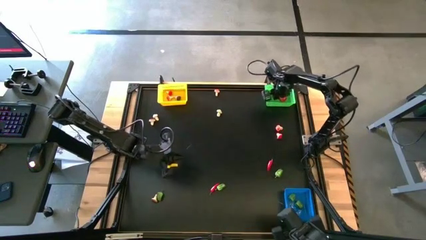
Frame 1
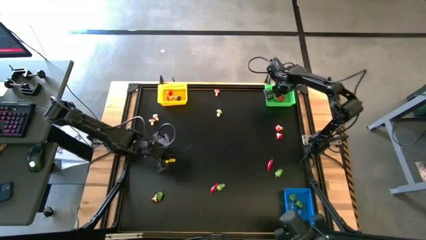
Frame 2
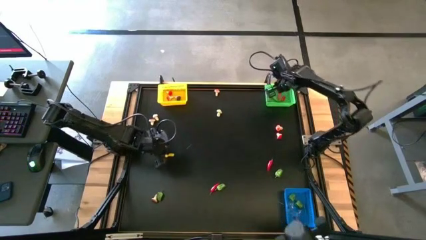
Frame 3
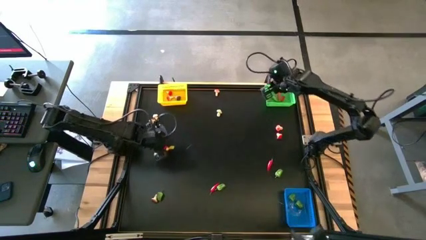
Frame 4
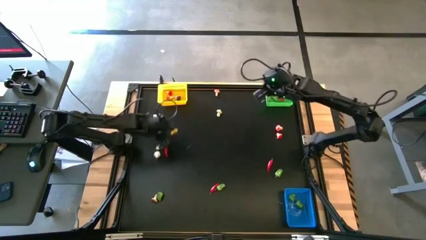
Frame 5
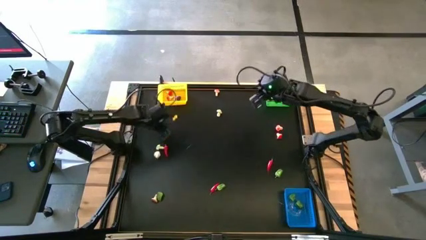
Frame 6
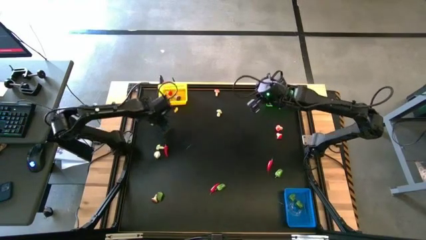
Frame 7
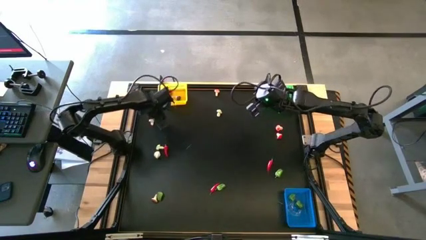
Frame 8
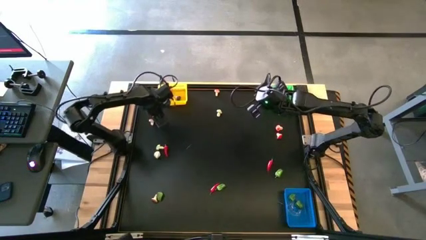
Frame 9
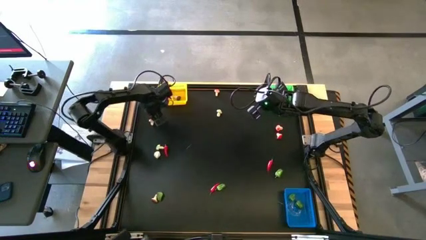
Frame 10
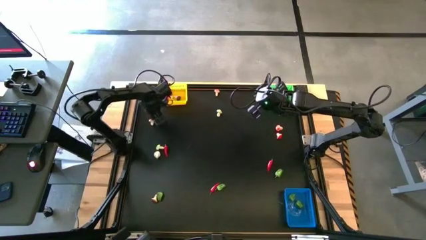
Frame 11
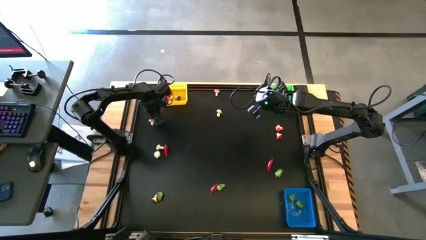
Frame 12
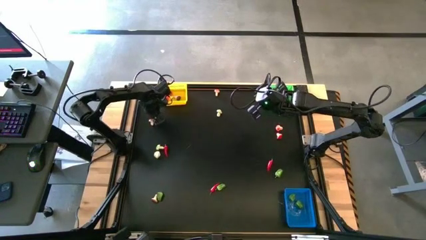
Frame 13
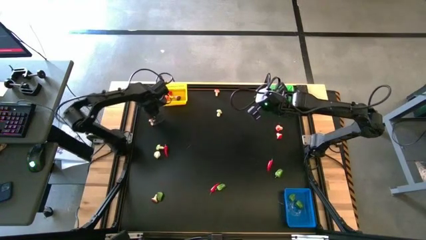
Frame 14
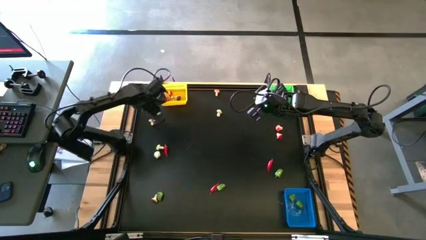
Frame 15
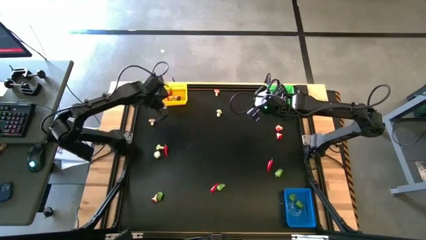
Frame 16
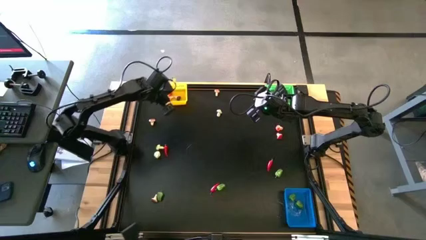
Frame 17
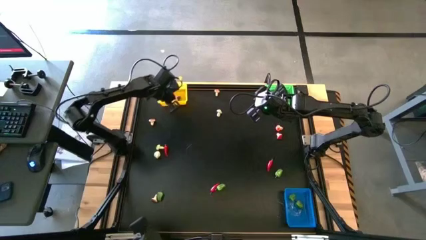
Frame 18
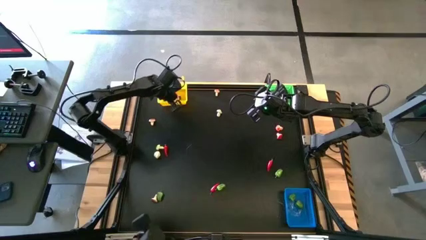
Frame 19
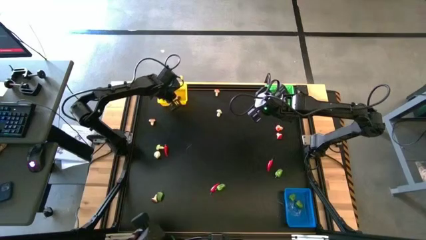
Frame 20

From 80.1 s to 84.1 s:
Task: Sort produce into baskets
Put the brown mushroom into the yellow bin

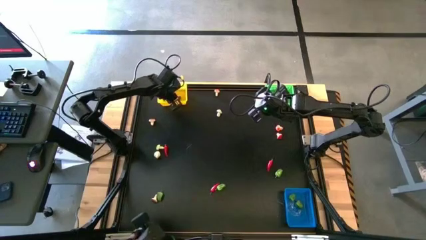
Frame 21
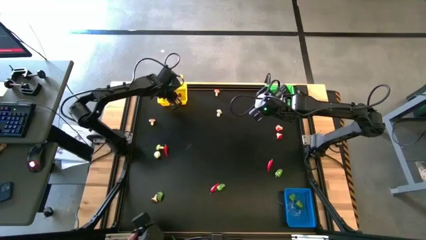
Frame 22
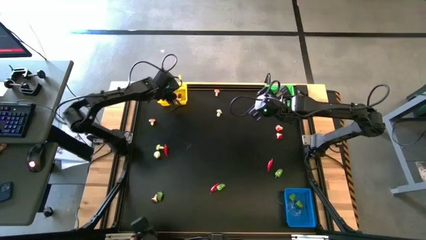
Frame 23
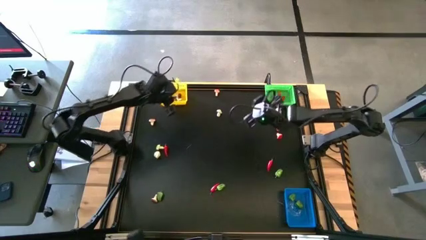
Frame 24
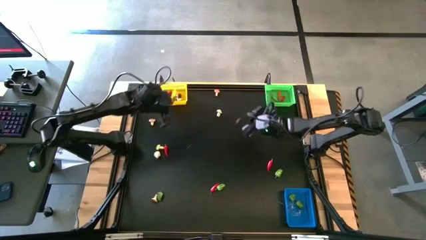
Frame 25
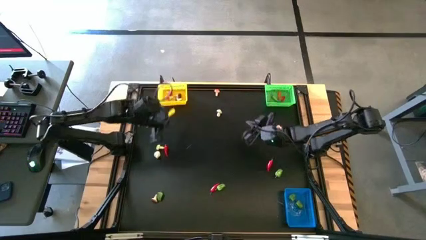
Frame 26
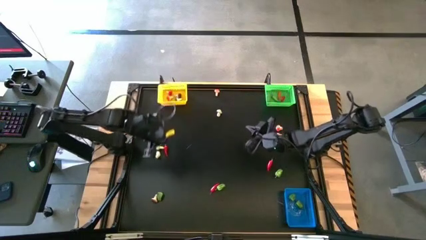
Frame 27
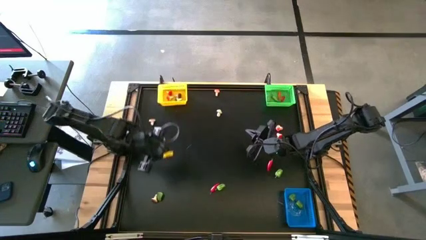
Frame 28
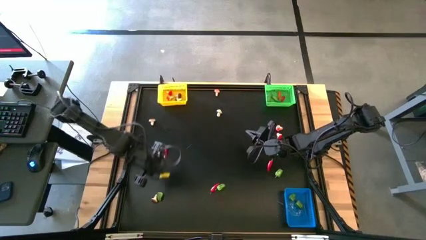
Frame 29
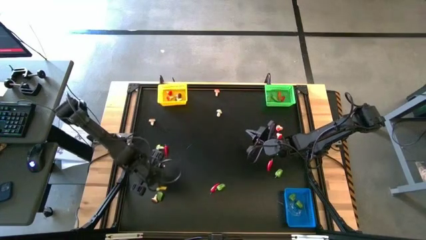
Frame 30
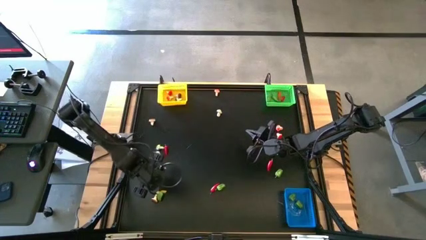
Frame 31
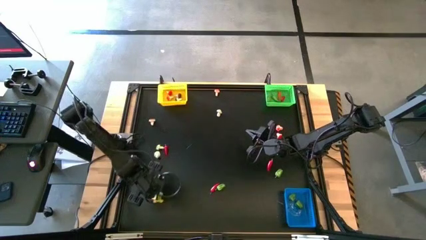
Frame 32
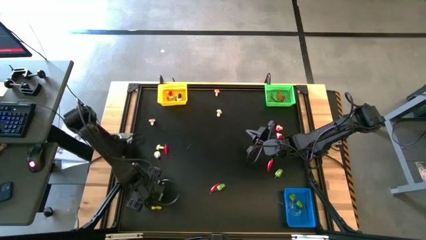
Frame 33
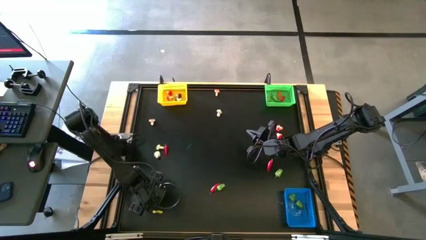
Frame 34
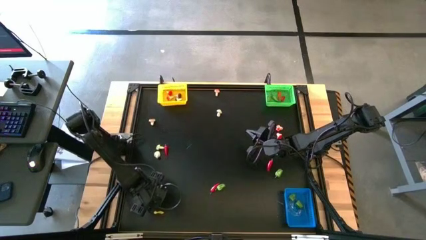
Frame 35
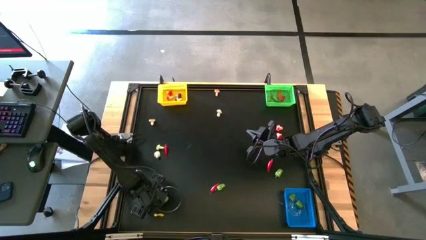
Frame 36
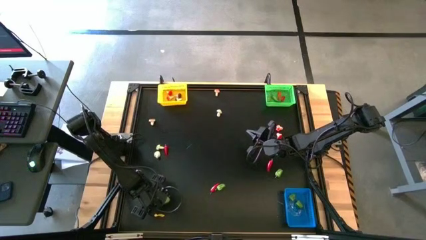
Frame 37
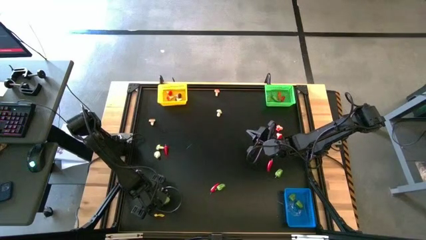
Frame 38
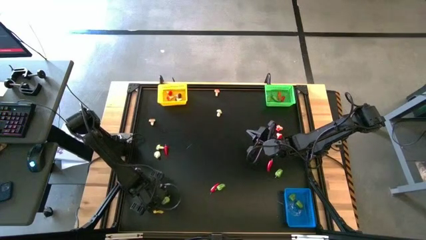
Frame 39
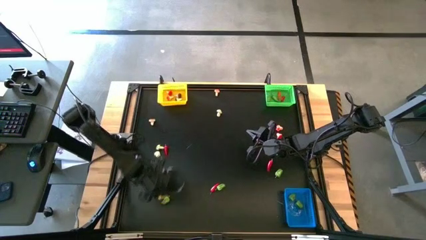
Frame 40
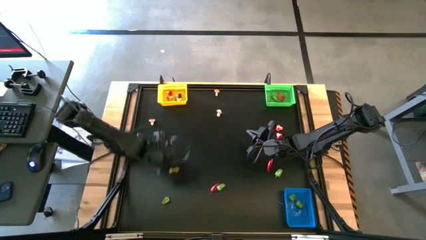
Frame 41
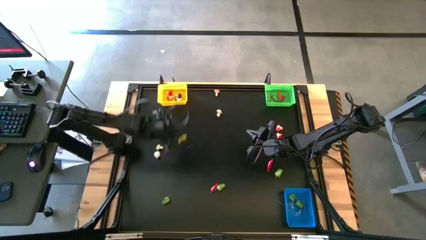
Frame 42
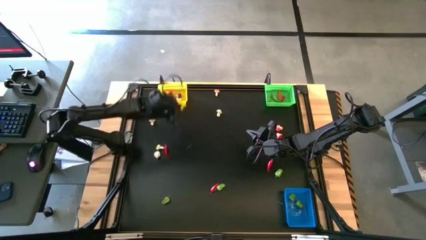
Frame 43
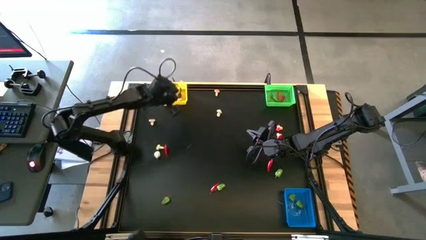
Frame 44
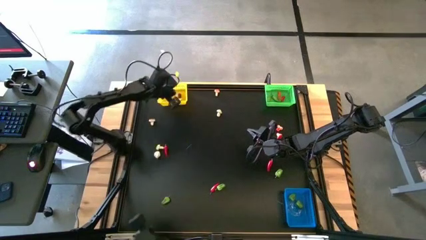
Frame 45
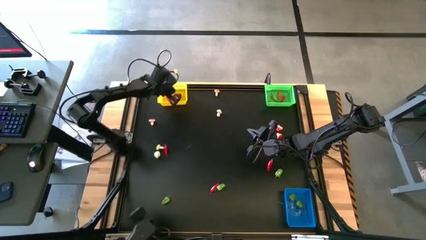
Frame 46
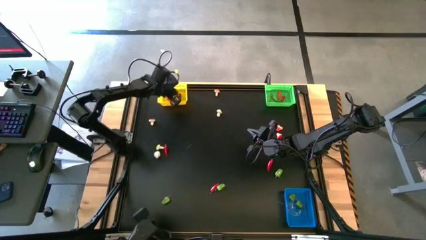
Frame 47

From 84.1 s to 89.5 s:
Put the brown mushroom into the yellow bin

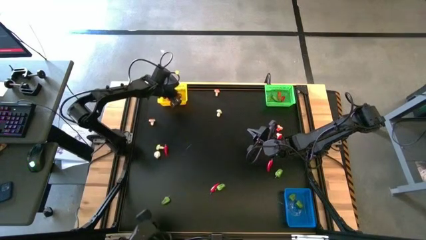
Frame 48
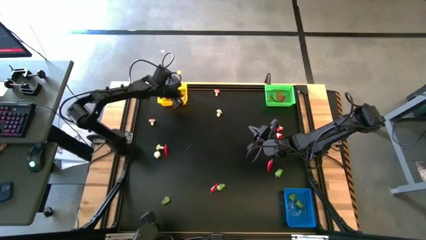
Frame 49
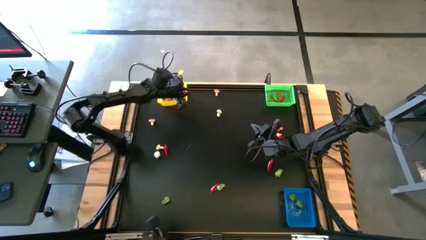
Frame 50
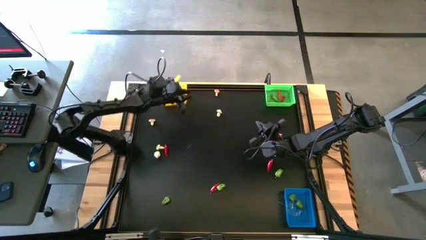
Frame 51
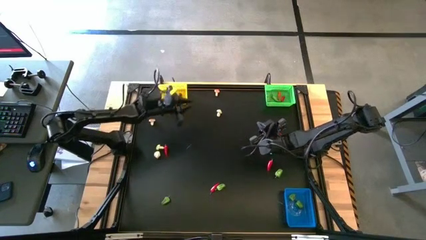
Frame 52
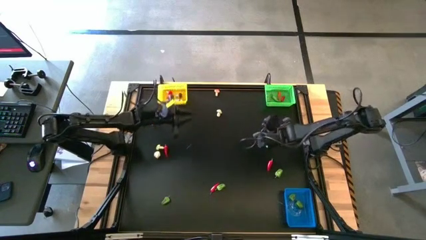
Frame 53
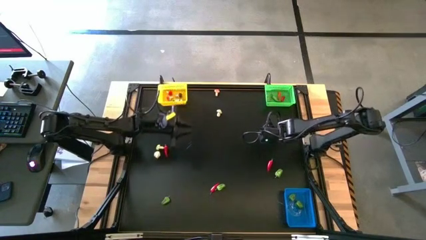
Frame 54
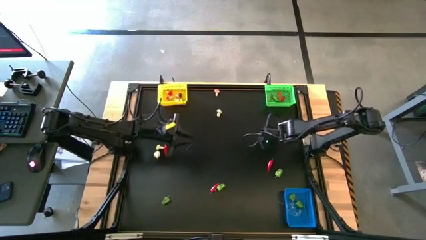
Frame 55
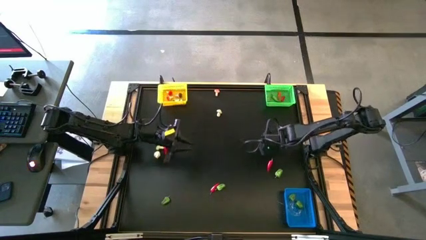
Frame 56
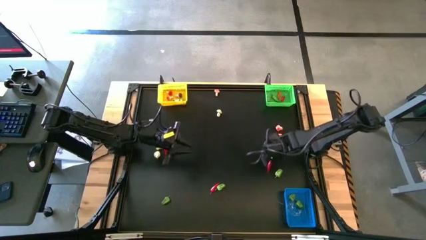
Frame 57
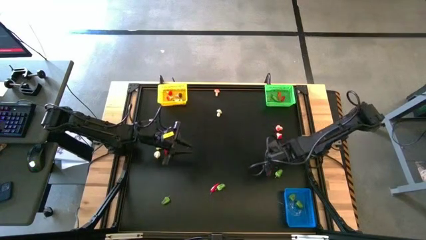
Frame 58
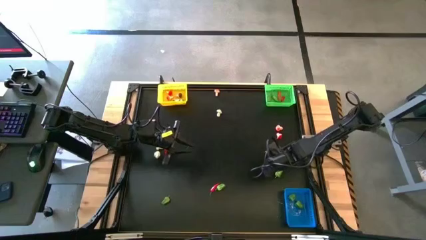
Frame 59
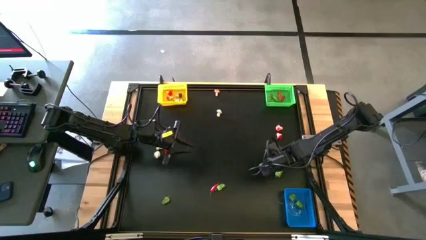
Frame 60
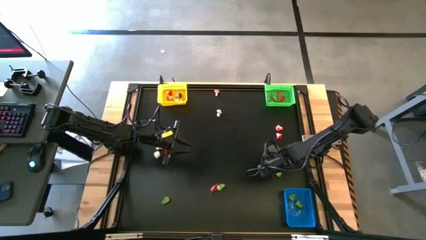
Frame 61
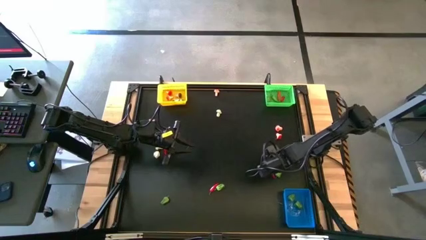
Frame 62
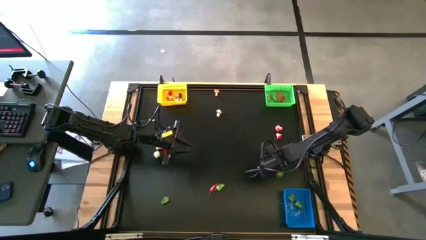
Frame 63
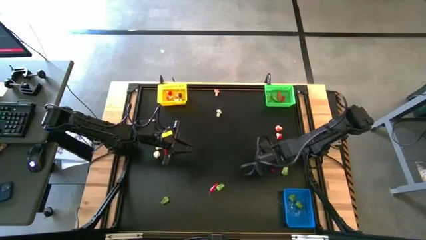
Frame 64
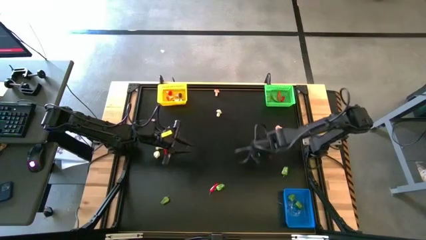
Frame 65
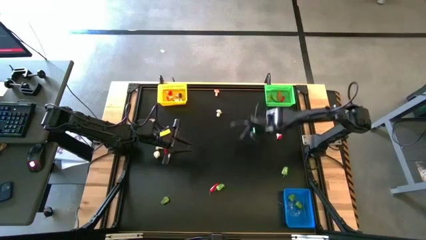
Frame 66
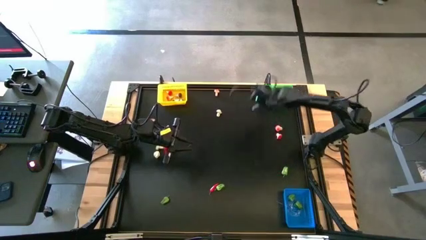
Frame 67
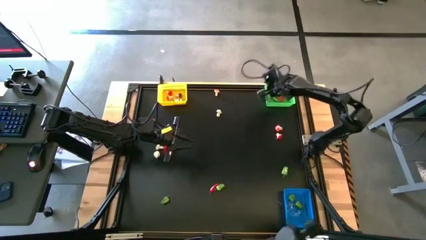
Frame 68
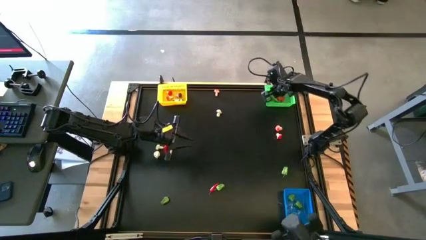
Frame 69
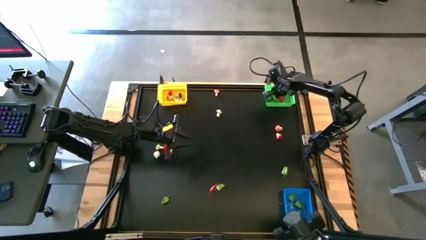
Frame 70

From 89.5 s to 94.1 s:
Put the red chili pepper into the green bin
